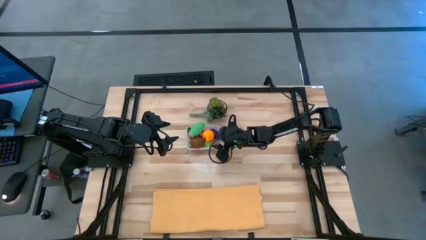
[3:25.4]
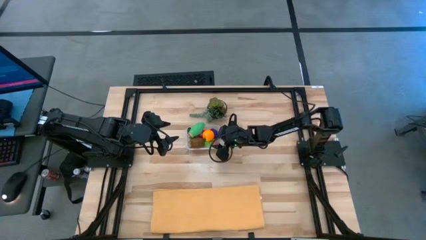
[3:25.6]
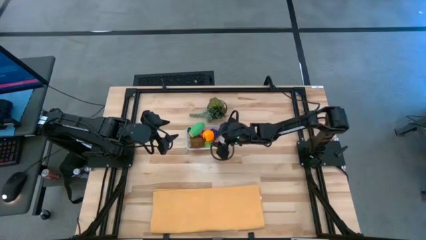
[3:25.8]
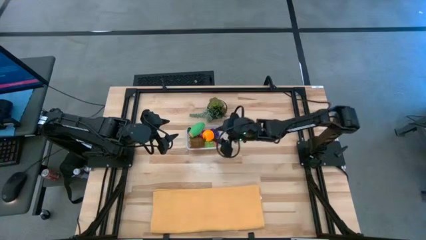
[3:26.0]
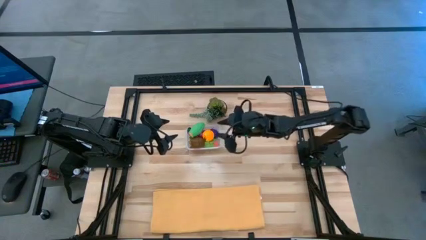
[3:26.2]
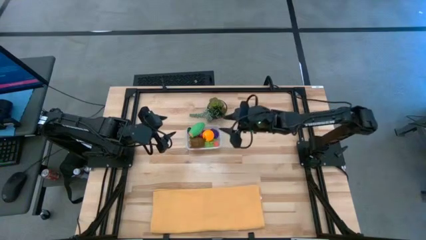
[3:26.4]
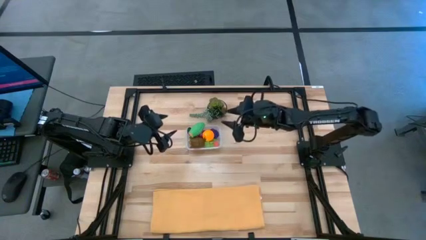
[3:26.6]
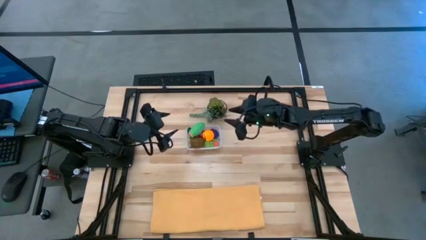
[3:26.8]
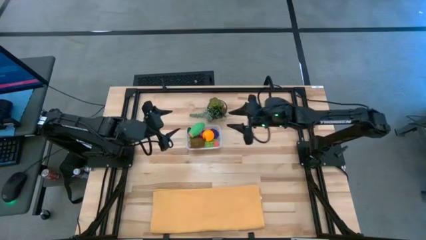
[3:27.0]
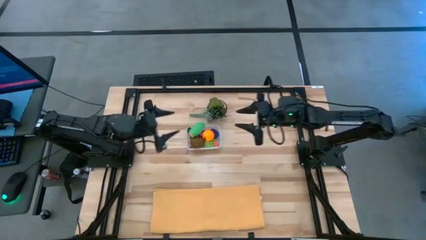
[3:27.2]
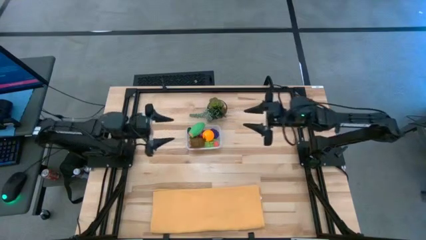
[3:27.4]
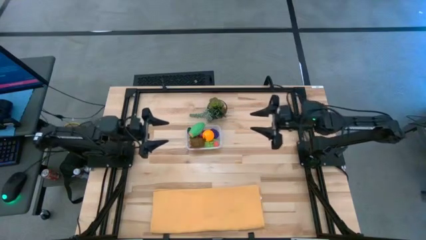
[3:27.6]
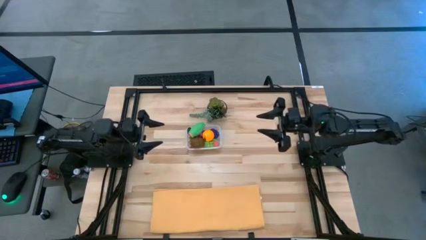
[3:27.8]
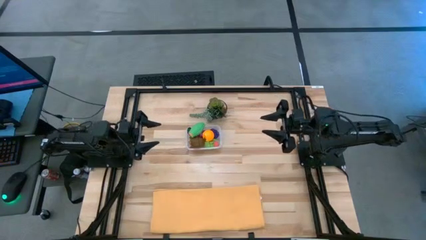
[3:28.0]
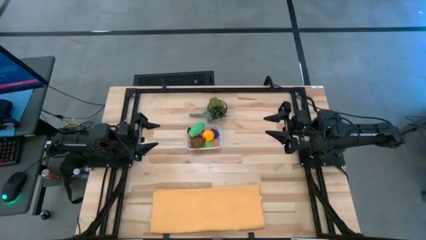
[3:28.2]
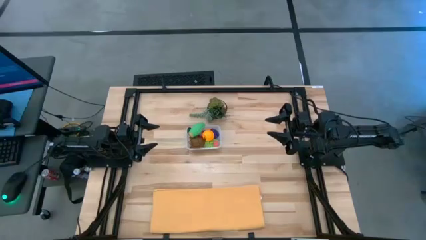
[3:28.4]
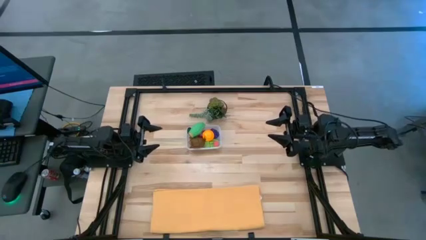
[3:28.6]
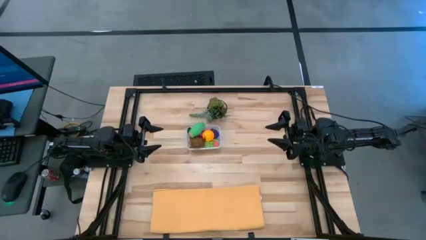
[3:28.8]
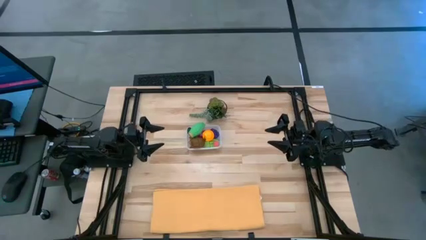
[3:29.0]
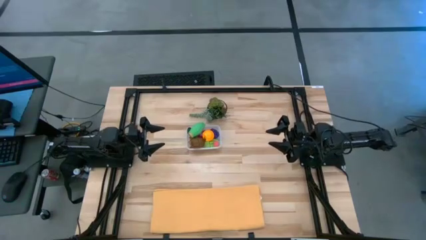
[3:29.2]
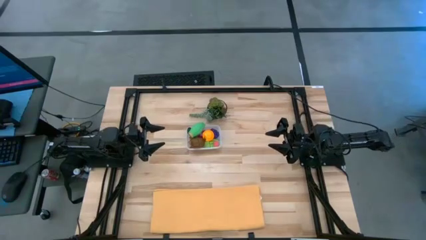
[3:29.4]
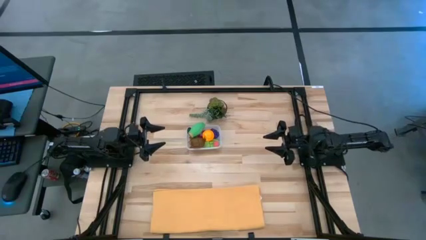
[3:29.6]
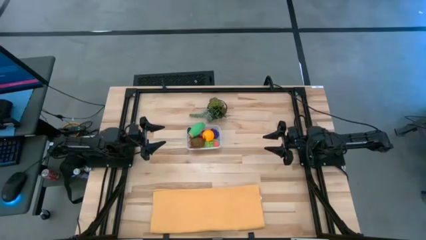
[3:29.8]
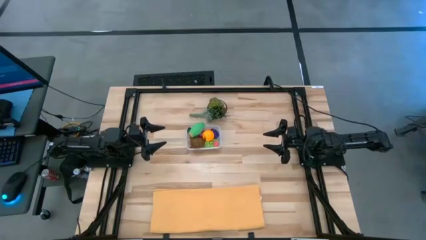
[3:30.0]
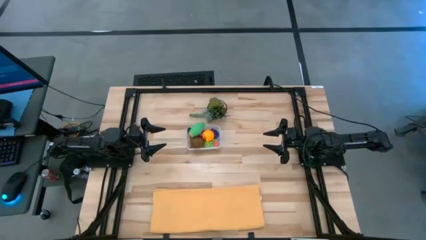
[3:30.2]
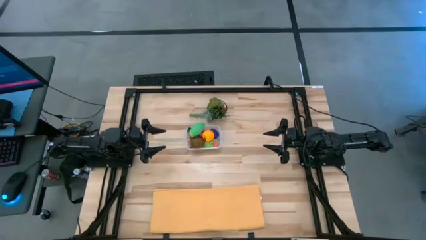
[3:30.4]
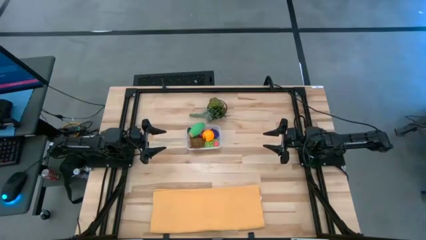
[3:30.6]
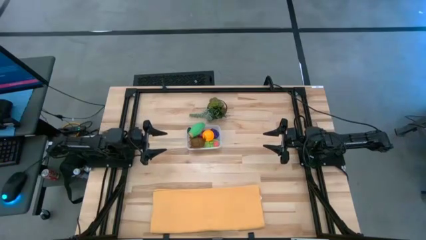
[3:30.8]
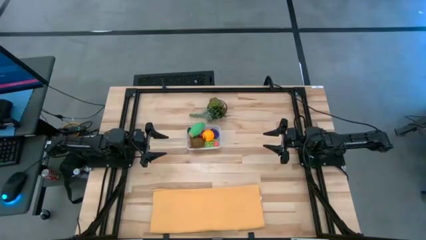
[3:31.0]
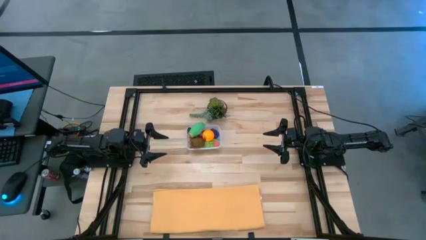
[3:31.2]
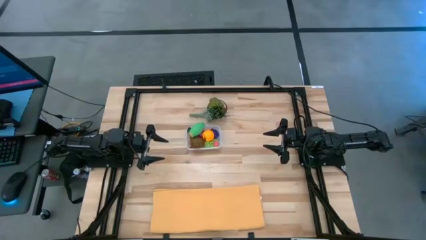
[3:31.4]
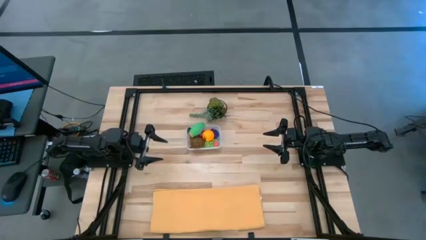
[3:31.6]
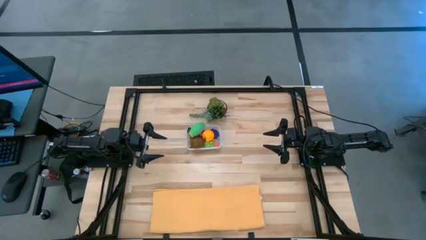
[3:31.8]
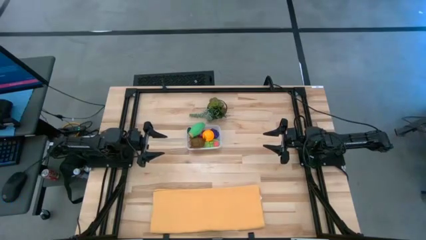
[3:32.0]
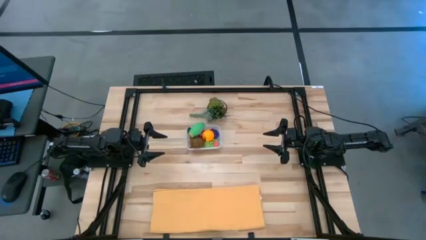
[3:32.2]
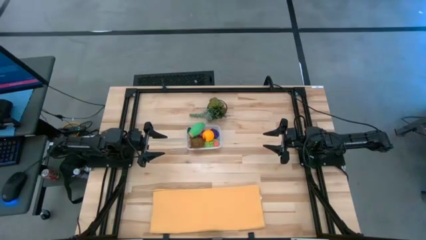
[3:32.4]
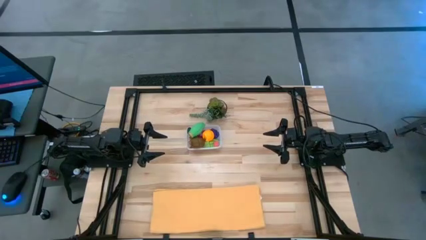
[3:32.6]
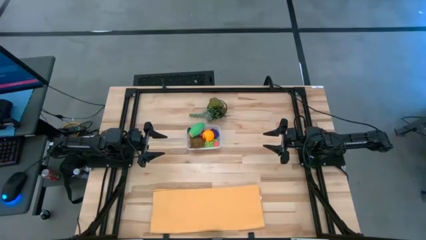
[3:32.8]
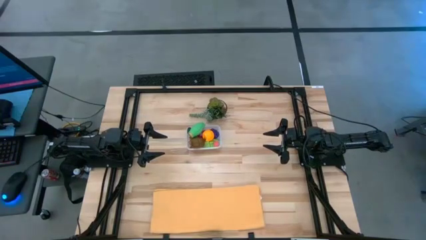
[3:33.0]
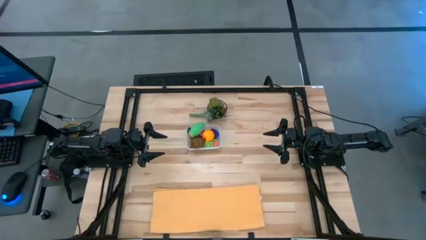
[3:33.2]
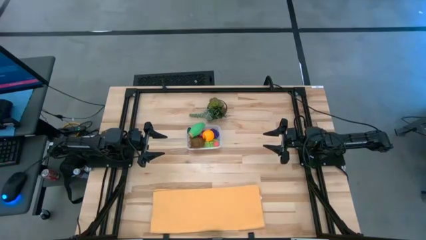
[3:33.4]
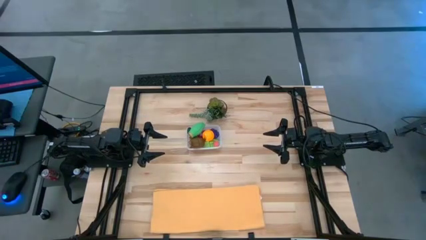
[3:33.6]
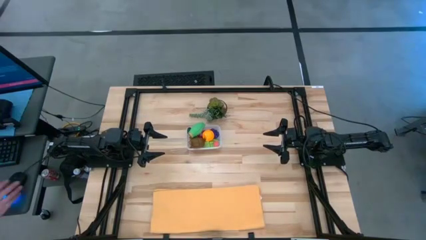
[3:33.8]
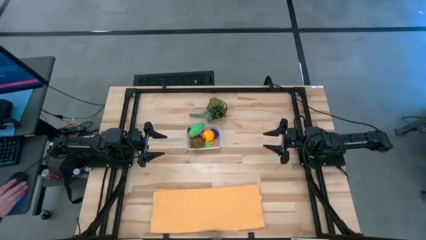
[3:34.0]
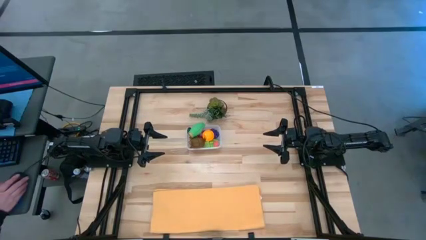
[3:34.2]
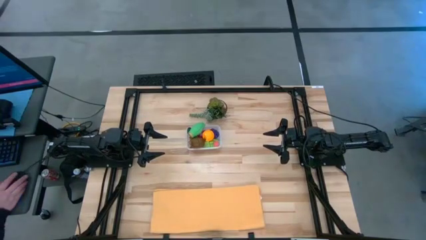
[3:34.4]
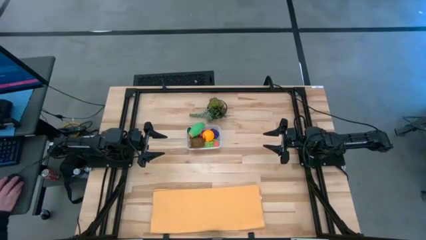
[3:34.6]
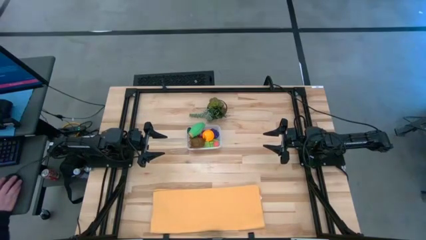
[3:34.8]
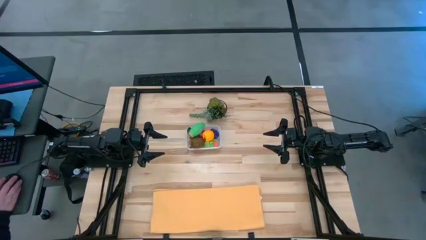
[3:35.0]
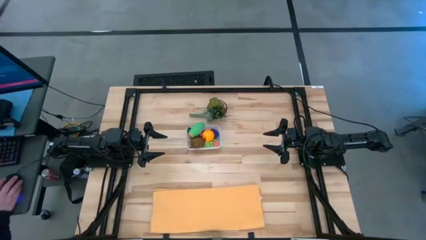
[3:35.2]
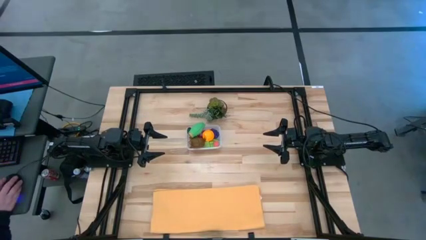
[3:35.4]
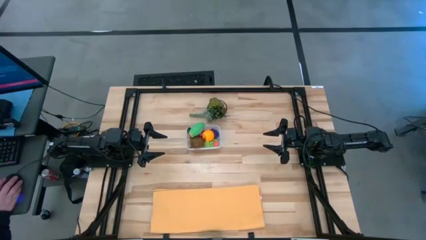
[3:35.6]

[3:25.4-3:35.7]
Task: Pick and placing Produce into tupperware
Return to Home Position

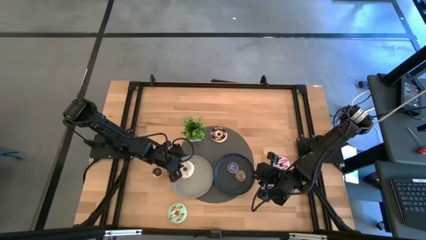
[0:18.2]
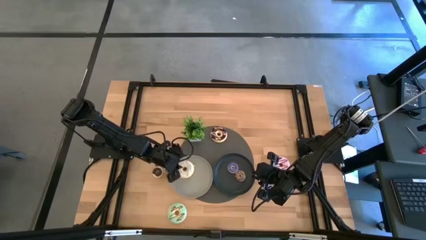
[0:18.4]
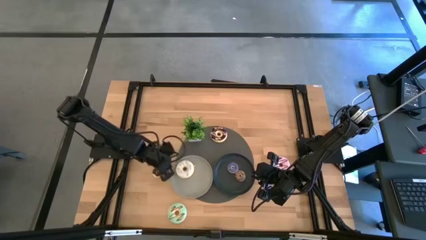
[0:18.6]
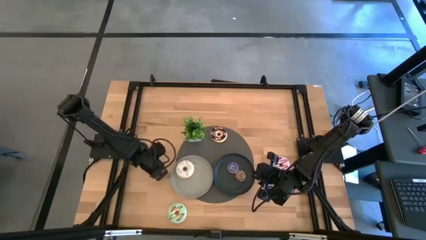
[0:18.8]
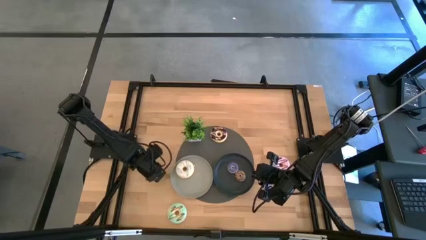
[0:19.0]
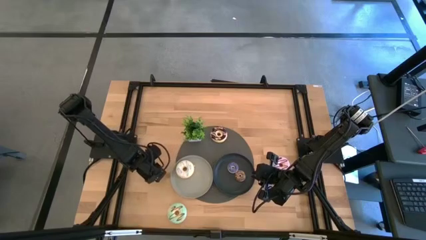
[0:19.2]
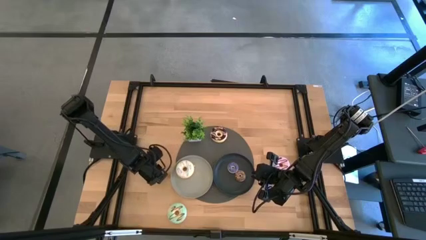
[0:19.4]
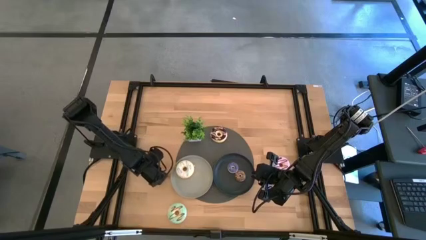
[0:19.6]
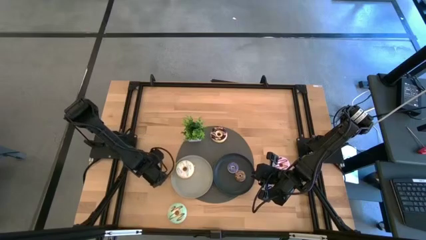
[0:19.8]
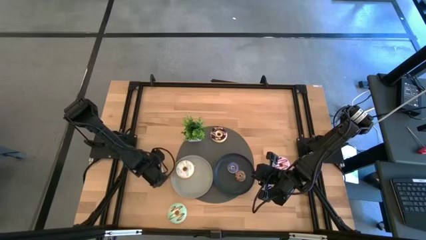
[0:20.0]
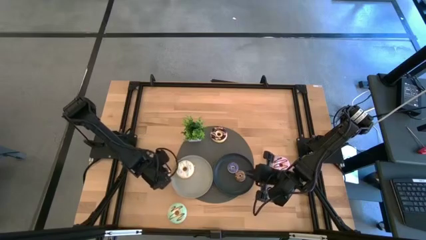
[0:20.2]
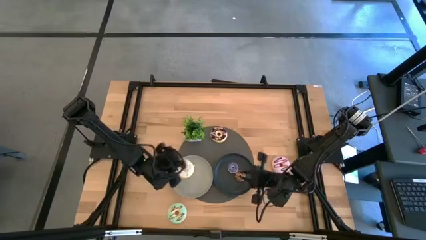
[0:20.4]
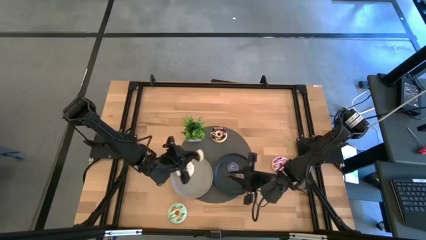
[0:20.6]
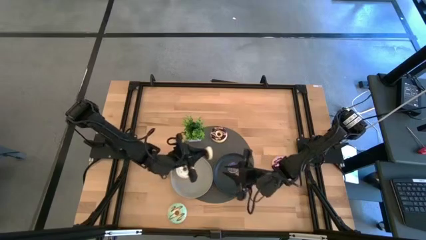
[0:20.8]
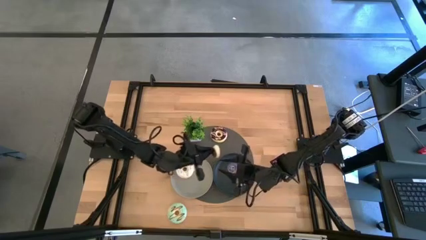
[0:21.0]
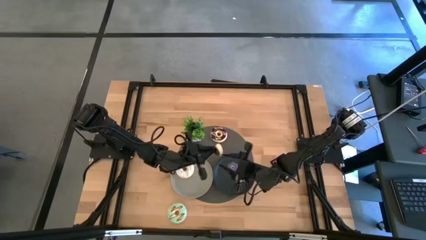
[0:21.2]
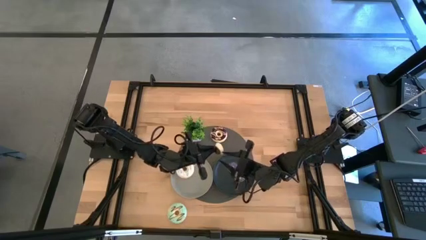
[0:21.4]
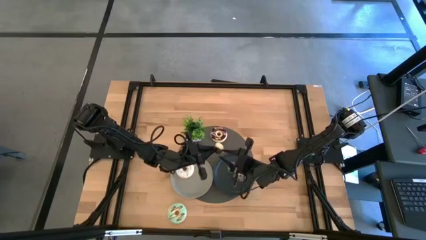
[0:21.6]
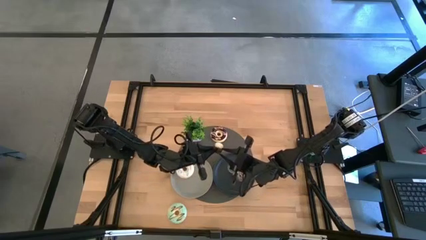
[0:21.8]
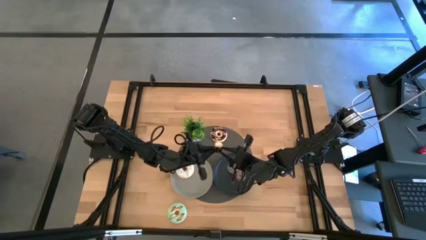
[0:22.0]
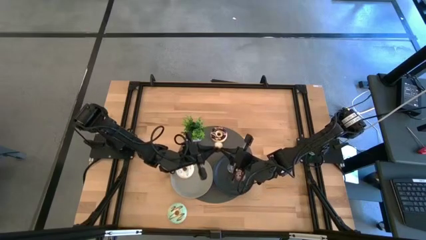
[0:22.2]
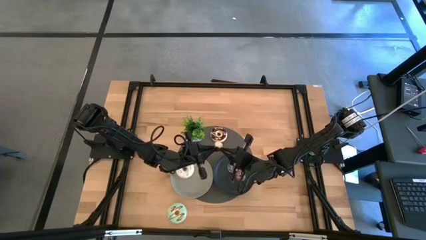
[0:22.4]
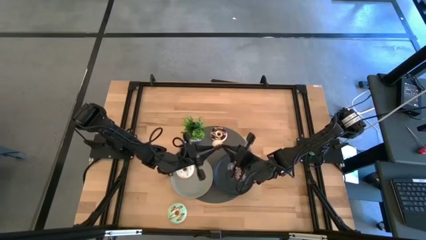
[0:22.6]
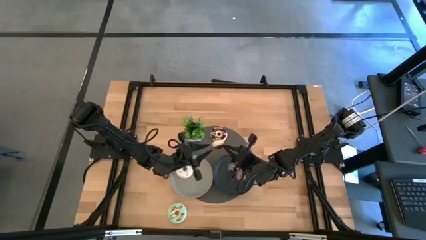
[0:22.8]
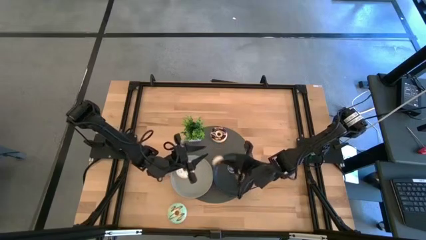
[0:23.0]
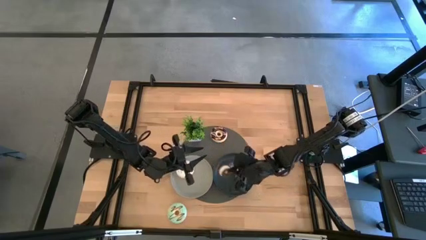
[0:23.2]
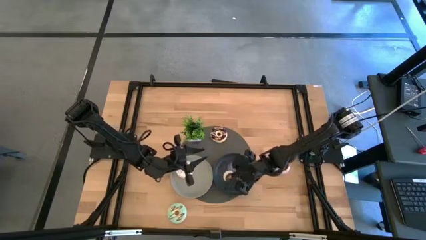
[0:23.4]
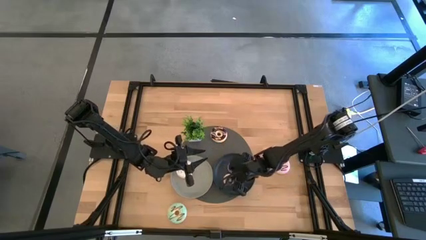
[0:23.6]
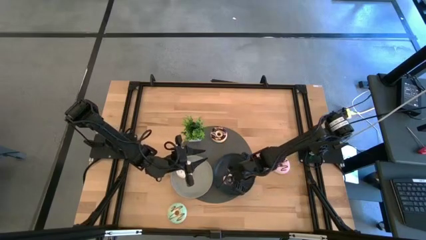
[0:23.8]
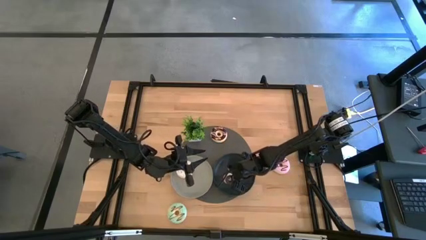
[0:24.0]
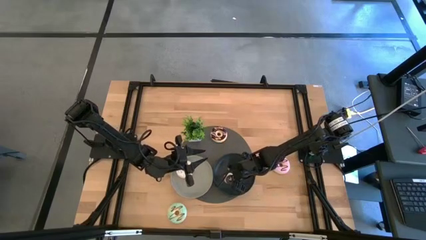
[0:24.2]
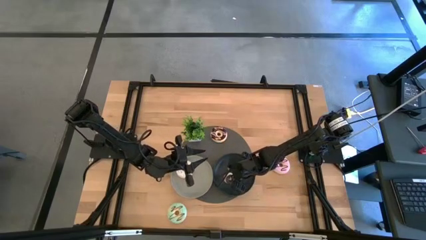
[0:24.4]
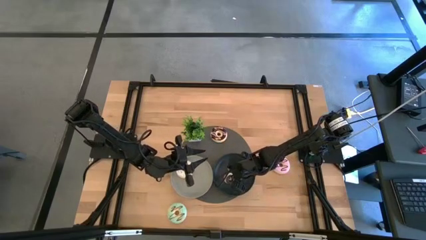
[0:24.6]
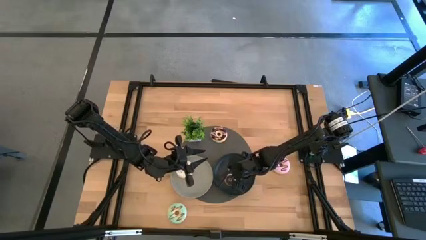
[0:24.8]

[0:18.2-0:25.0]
Task: Pick & Place donuts
Put the small black donut on the black plate
